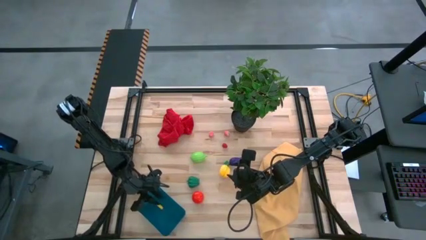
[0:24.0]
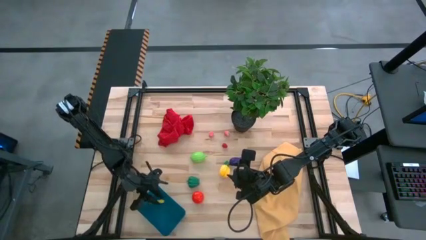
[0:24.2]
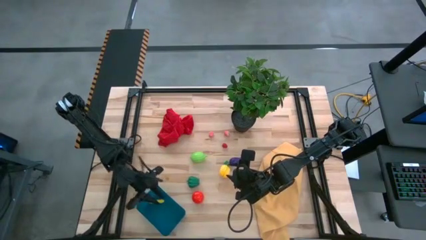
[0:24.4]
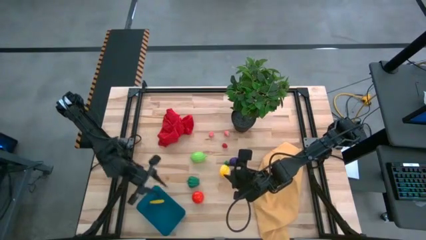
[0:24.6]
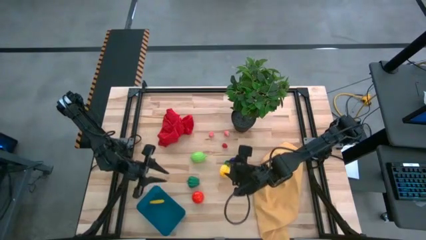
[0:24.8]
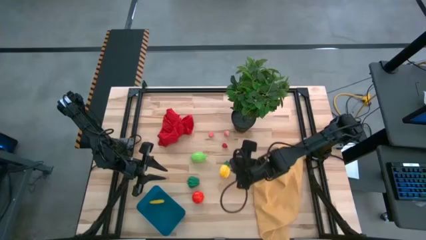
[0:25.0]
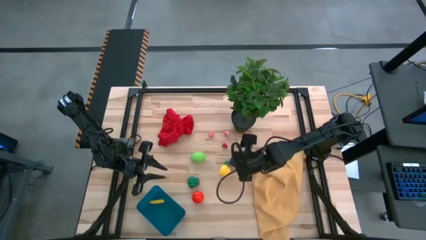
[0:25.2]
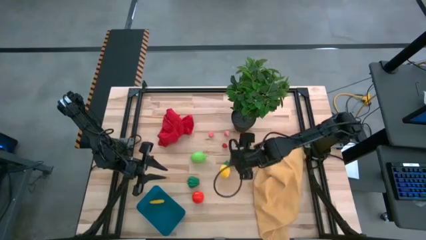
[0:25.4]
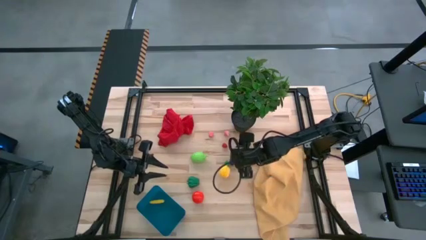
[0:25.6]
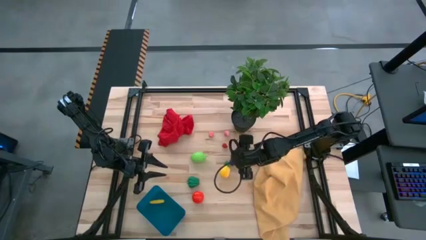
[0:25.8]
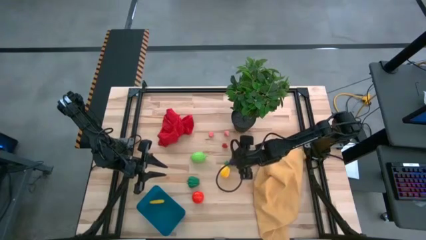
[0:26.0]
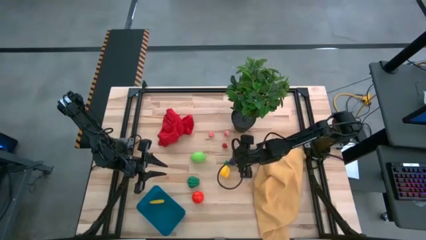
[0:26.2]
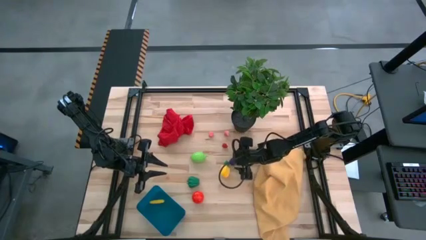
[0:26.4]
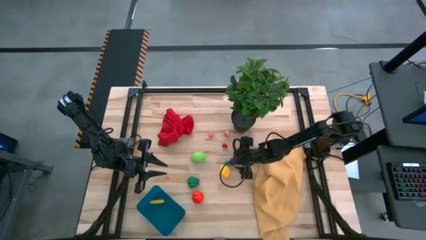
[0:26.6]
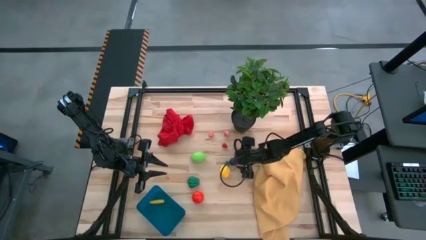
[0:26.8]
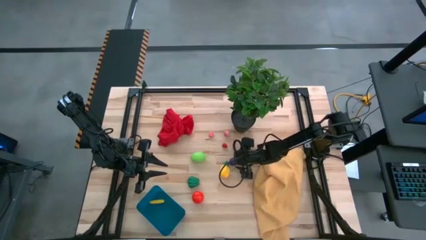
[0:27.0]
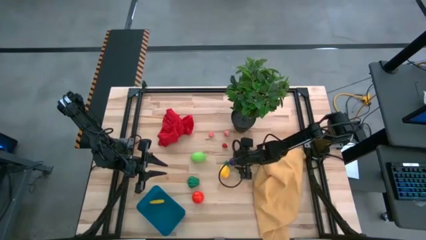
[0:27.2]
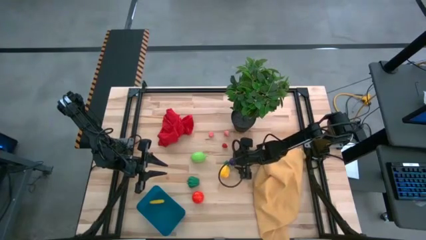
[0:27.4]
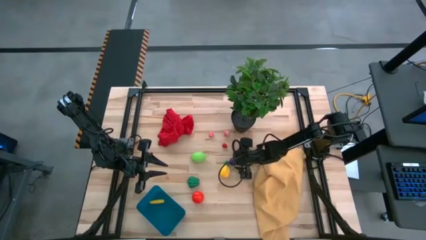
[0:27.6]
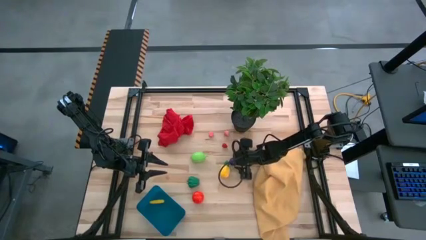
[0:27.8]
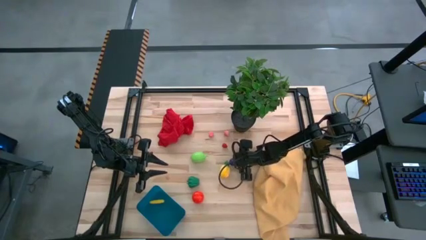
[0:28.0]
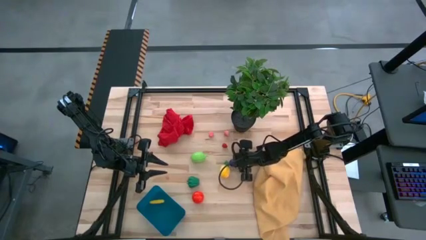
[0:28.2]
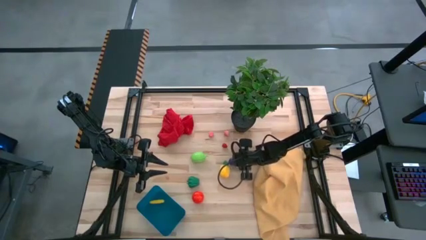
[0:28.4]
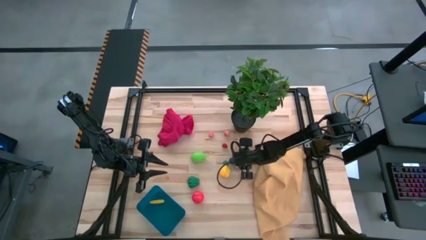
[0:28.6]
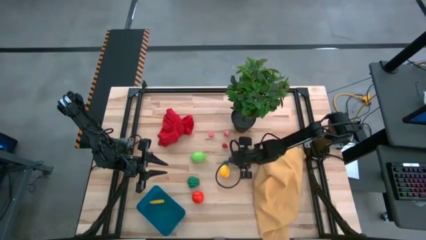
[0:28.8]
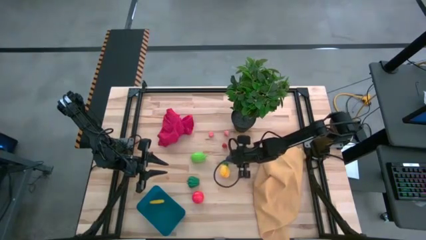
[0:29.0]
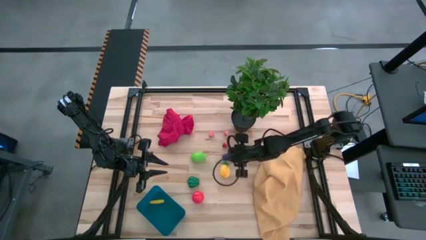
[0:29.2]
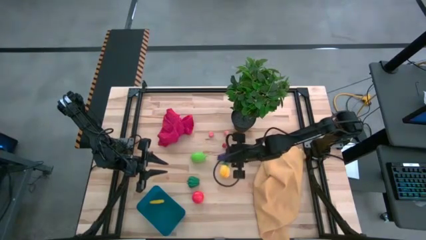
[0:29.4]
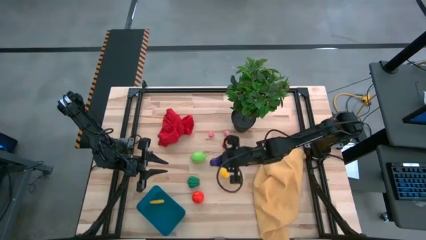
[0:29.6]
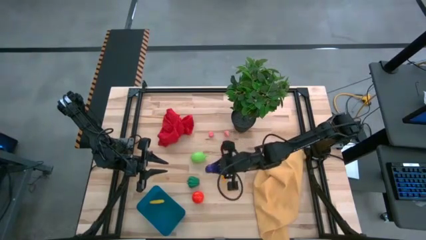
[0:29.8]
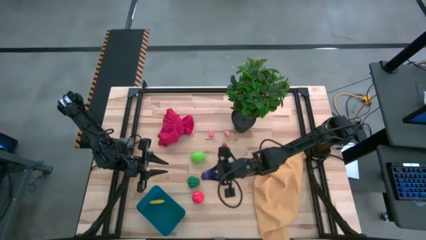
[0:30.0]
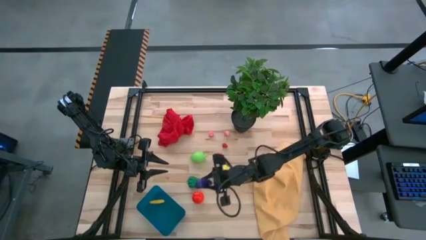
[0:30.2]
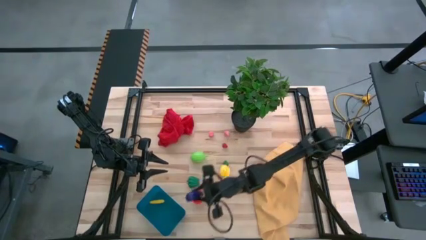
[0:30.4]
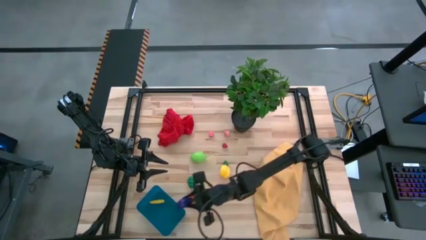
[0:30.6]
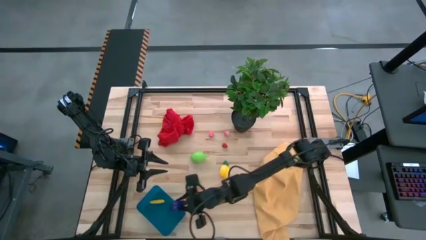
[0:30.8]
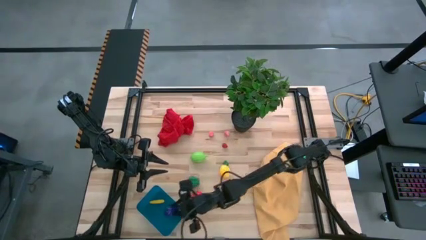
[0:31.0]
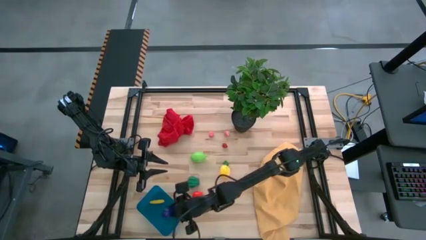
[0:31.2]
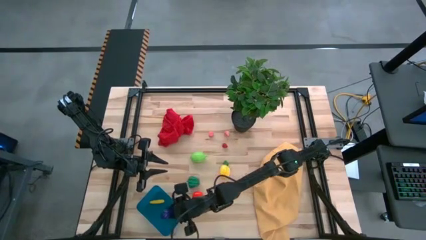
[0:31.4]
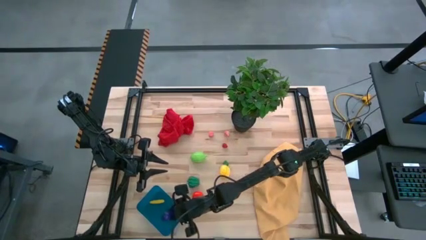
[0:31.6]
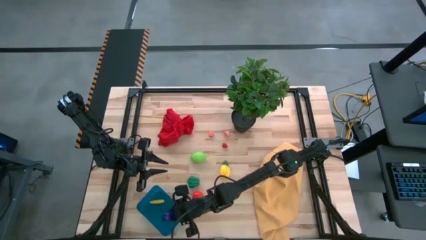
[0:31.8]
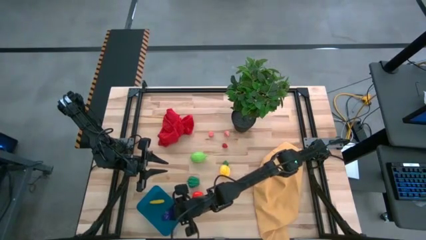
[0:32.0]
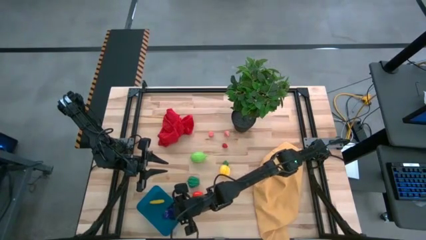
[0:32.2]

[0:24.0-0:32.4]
Task: Pick and placing Produce into tupperware
Put the purple eggplant into the blue bin

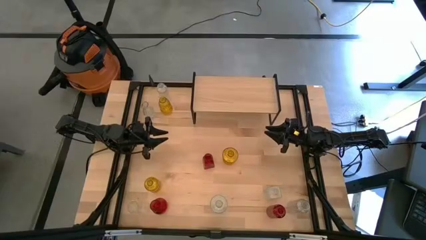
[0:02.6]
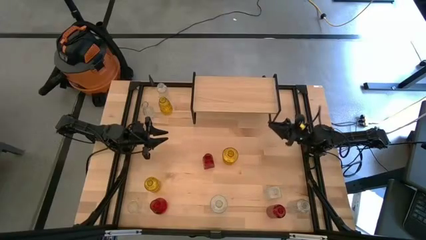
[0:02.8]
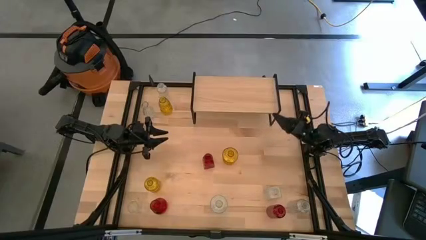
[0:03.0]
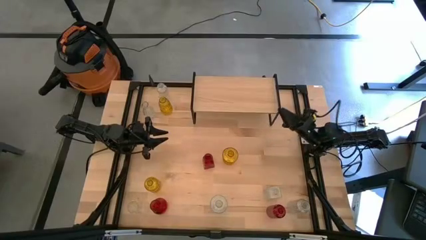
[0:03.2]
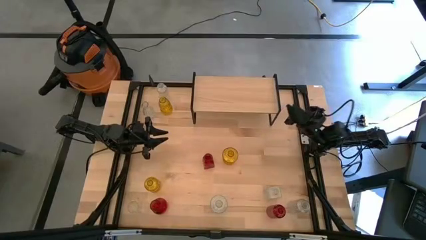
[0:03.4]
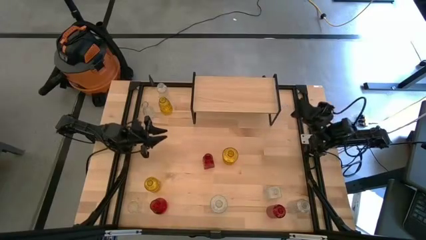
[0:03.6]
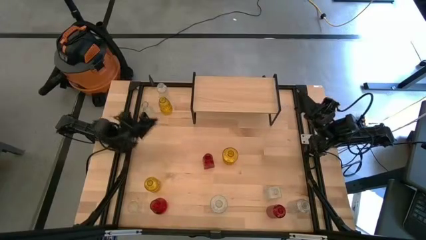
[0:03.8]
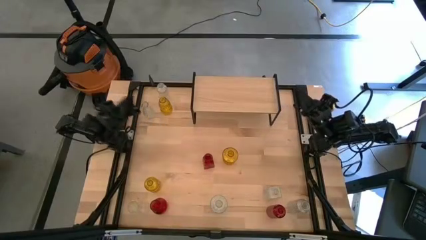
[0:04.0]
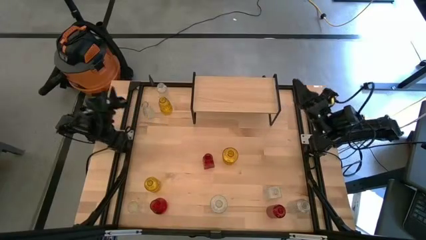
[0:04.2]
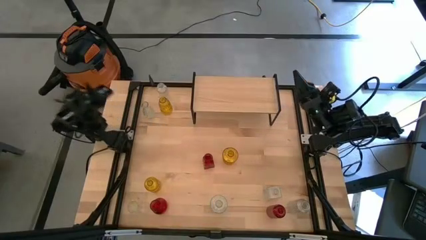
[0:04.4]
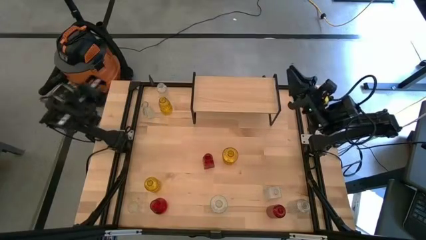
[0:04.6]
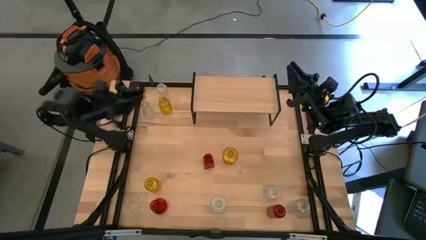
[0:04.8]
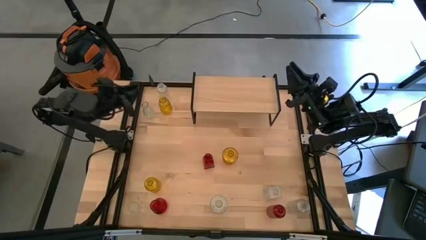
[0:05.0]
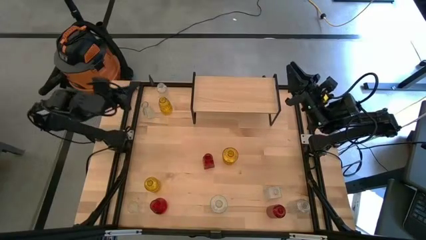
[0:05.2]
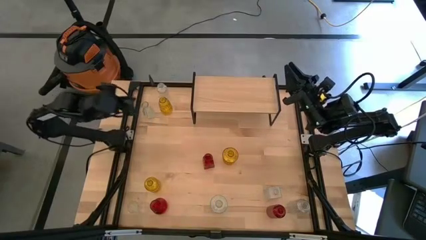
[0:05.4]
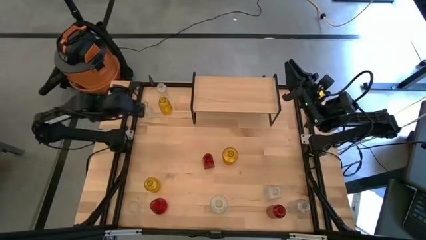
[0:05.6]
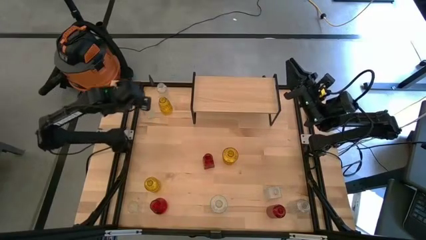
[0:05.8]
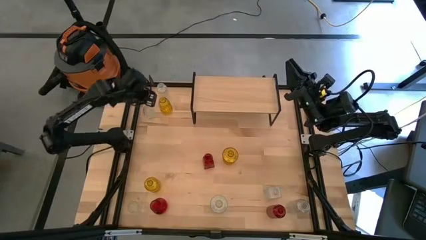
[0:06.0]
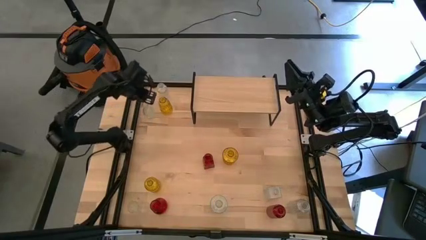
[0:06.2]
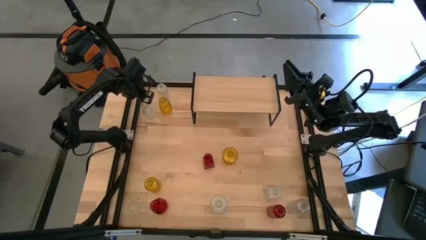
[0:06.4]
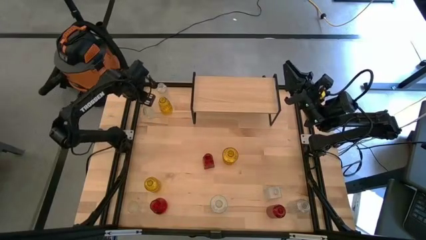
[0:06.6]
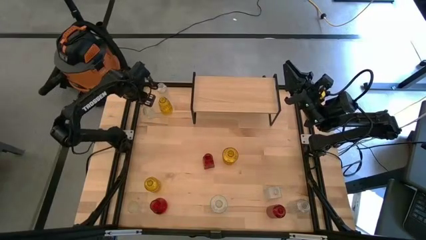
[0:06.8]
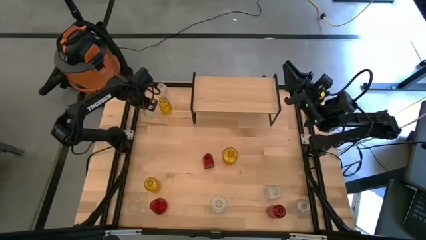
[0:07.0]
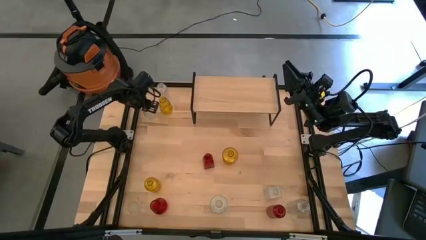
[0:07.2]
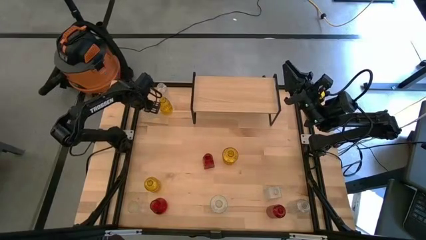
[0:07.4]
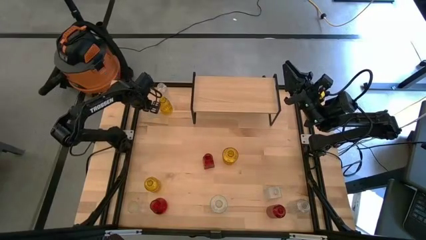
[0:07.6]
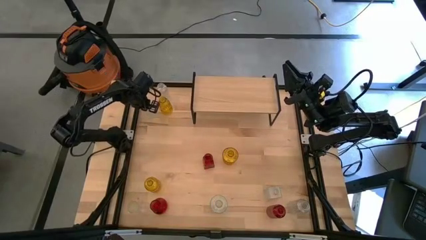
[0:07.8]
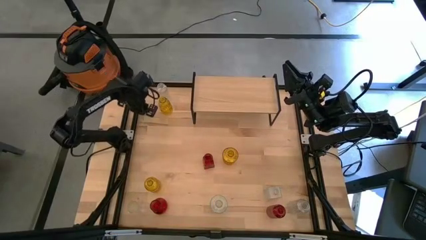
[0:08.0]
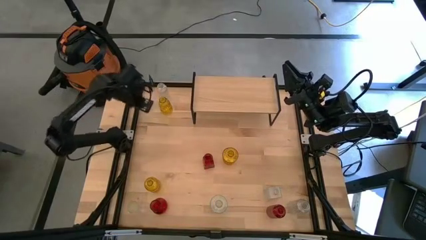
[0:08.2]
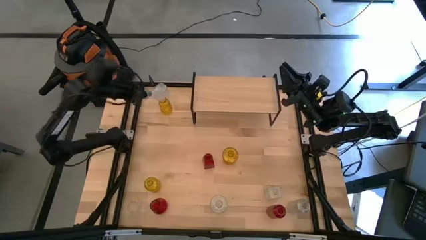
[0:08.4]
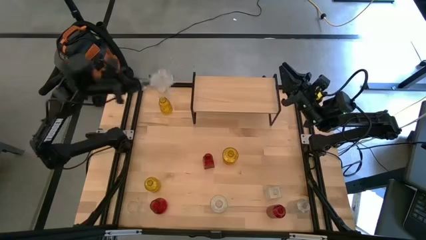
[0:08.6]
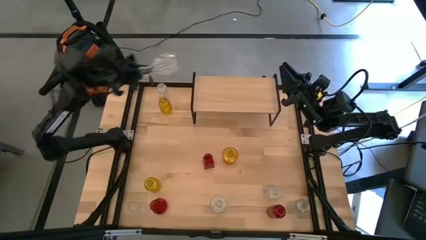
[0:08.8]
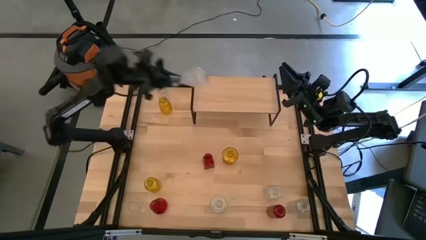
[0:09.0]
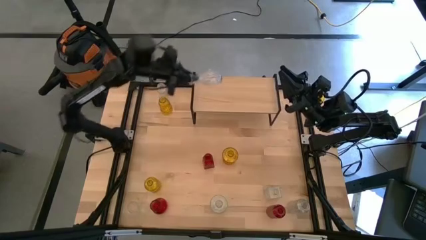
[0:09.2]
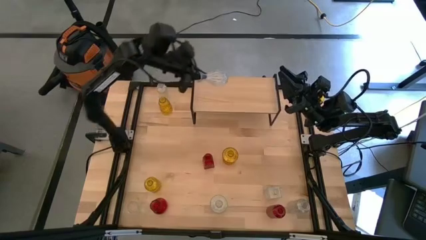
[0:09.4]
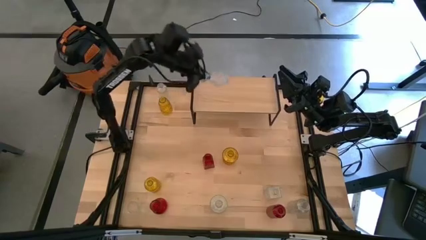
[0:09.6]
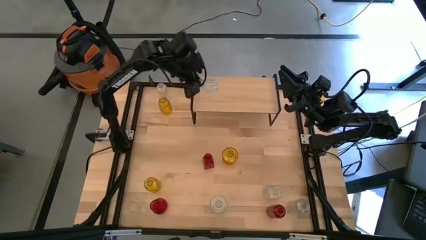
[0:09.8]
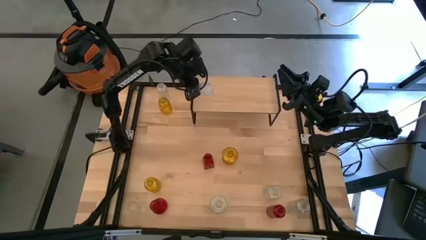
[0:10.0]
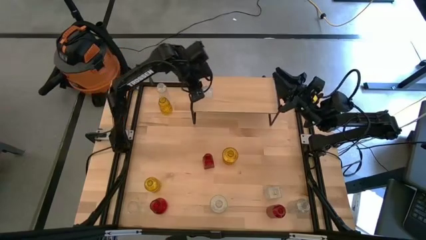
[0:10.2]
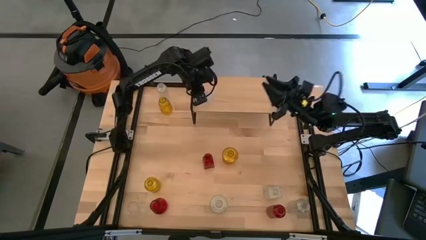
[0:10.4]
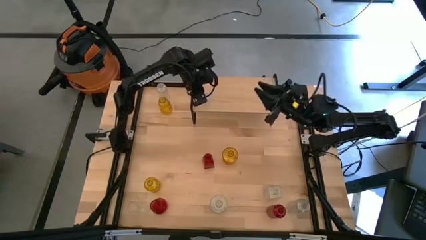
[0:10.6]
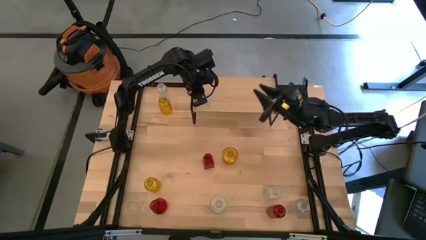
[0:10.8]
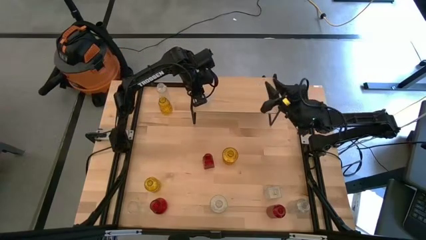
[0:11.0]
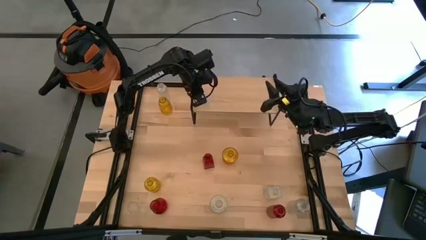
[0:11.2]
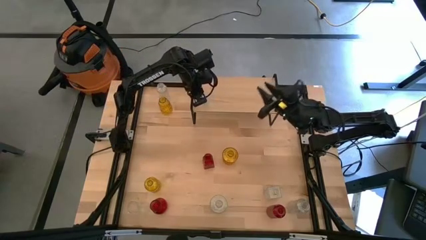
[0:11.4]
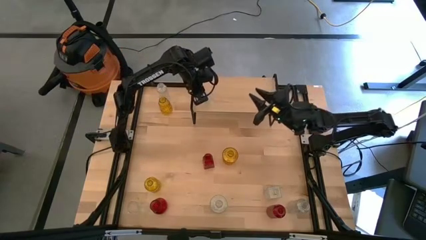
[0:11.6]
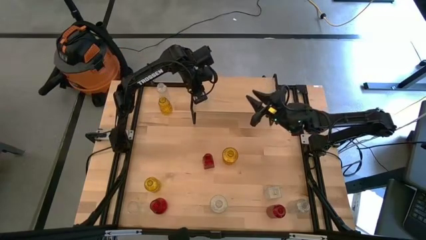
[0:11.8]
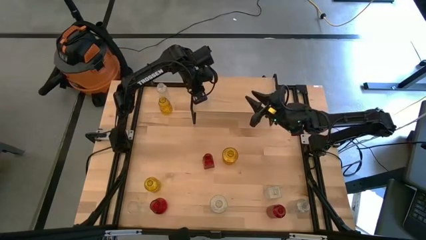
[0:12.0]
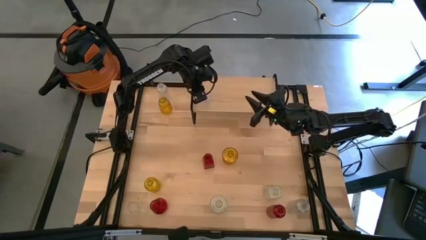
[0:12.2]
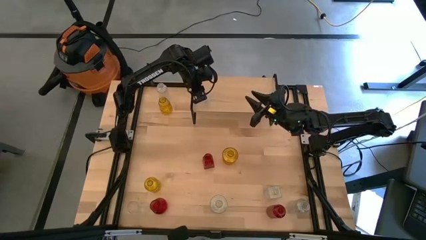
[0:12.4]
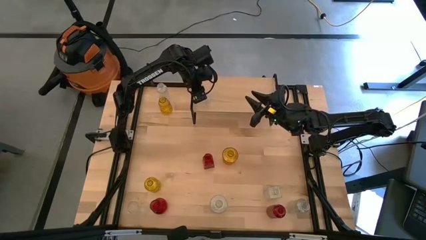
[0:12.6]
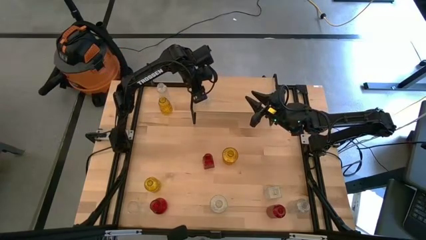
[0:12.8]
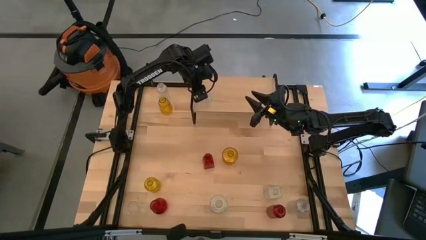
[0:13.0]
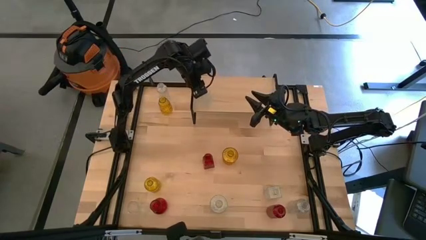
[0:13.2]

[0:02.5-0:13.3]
Task: sort vases onto shelf
Put the transparent vase on the shelf
